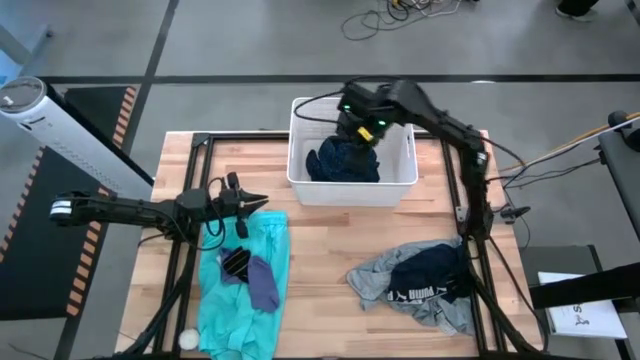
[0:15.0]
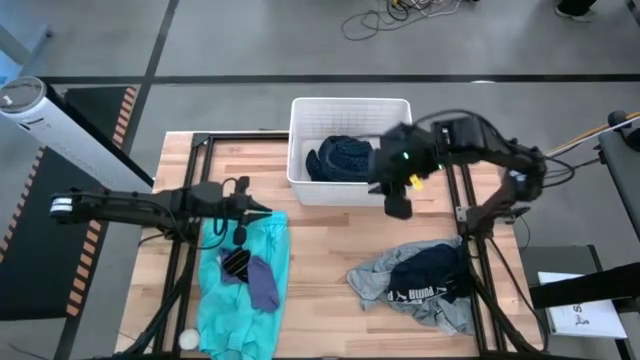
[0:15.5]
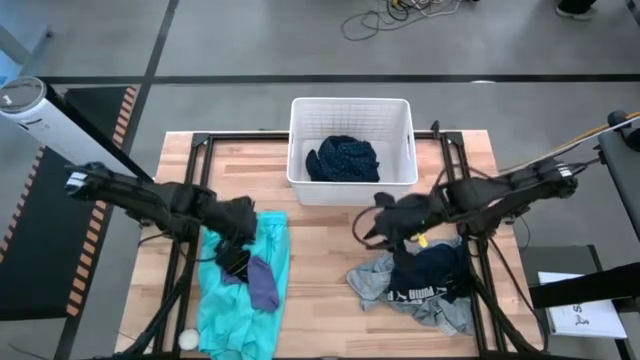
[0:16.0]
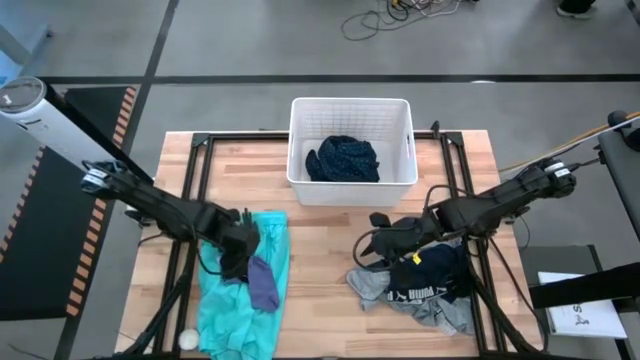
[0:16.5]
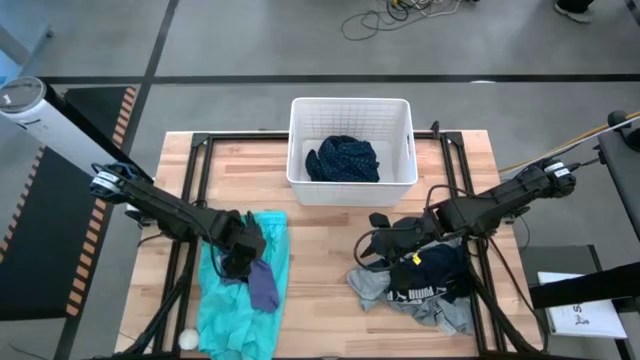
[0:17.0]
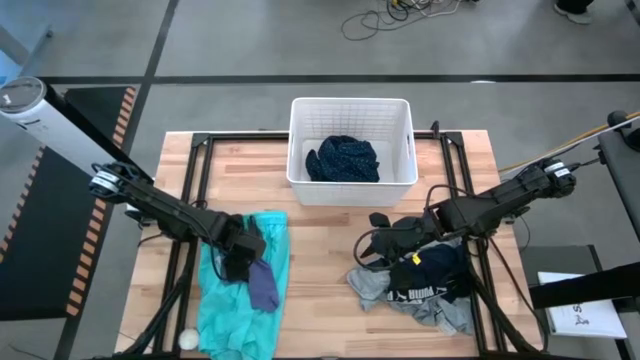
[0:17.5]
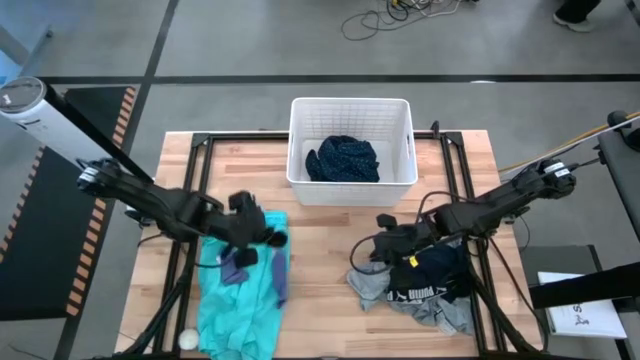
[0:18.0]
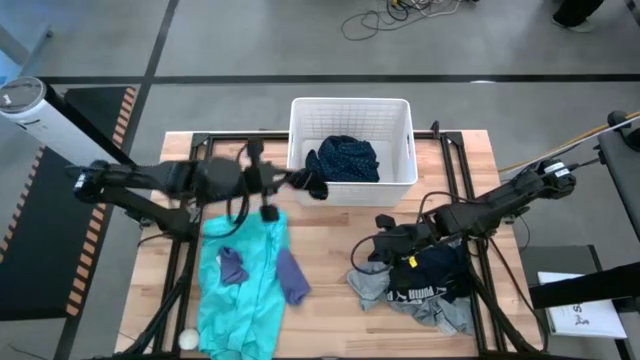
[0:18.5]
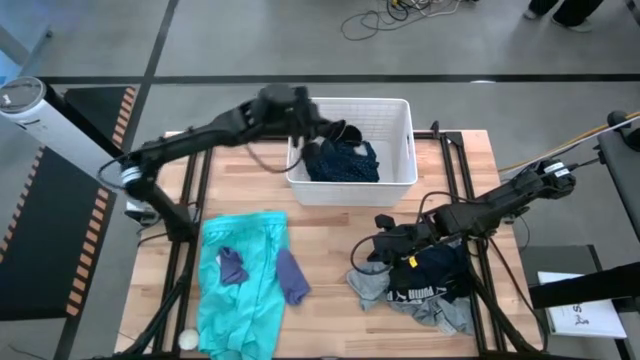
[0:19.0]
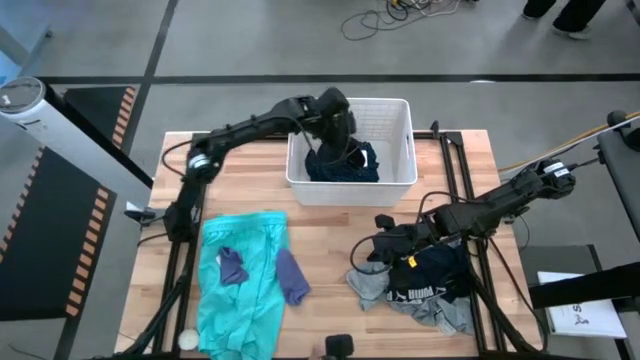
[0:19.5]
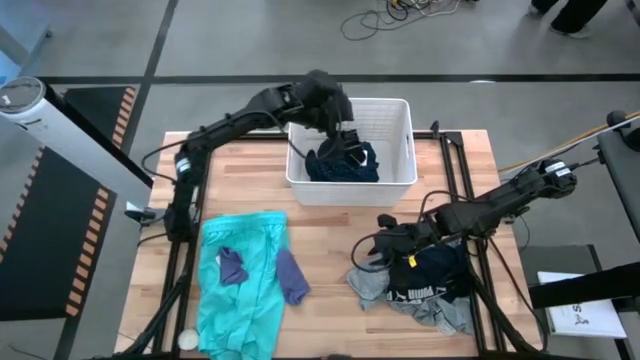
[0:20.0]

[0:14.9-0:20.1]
Task: Sort clothes
Put the black sock into the laundry bin

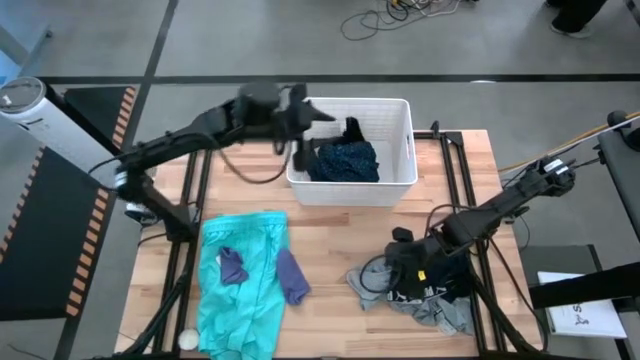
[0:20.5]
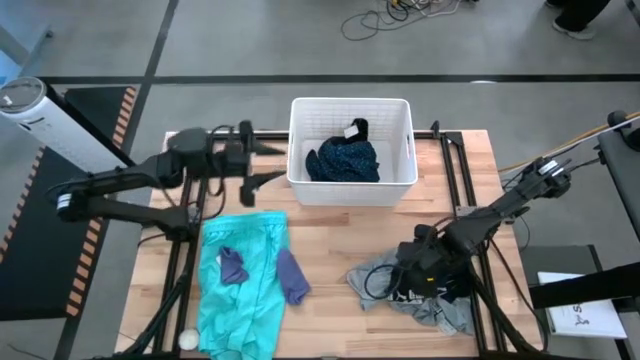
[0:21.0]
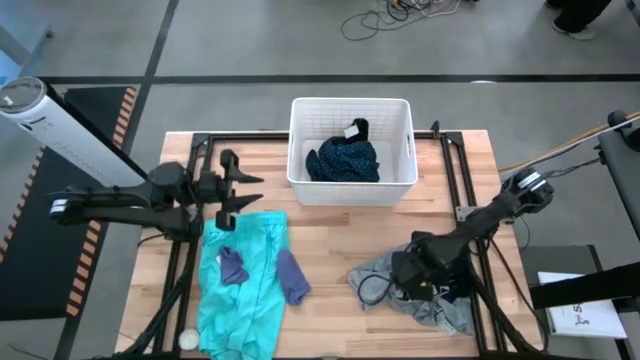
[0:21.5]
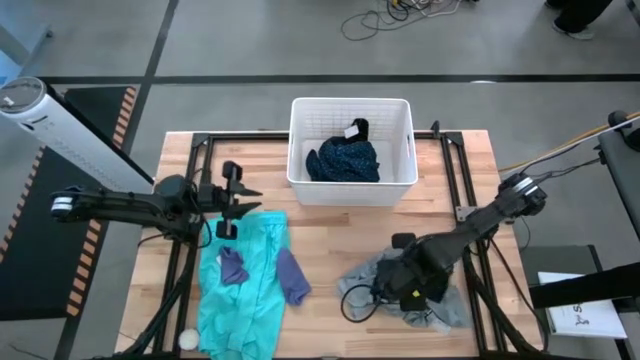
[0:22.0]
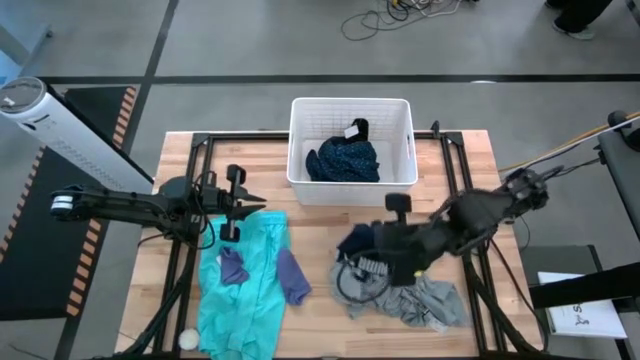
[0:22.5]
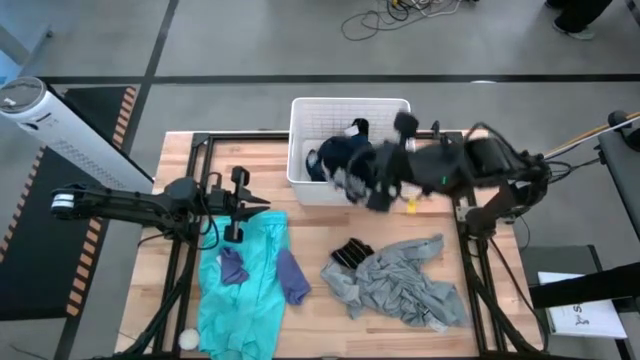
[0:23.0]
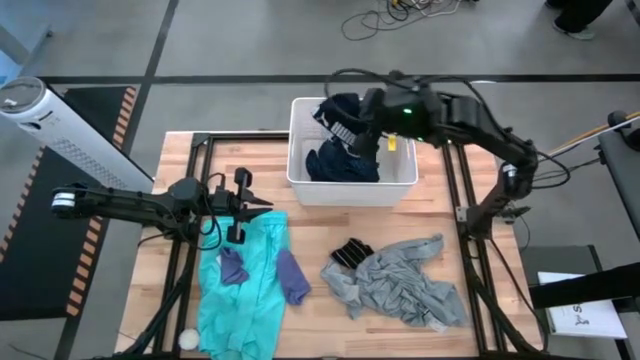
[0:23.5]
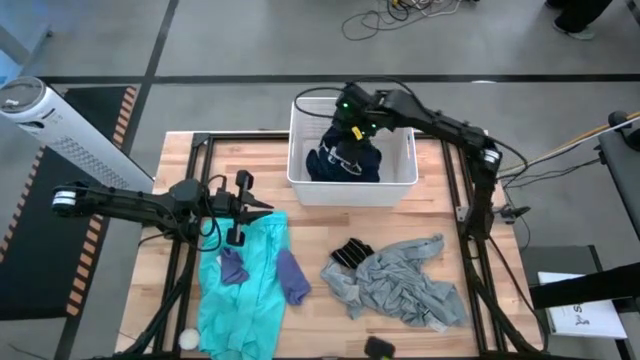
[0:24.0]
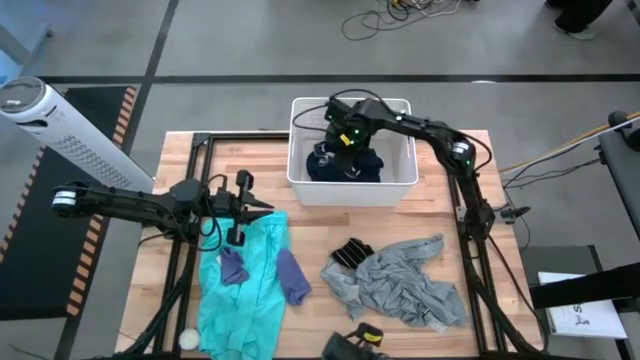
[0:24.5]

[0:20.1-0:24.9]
Put the blue boxers into the laundry bin

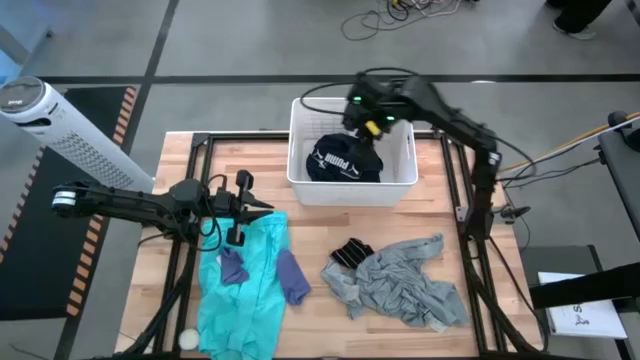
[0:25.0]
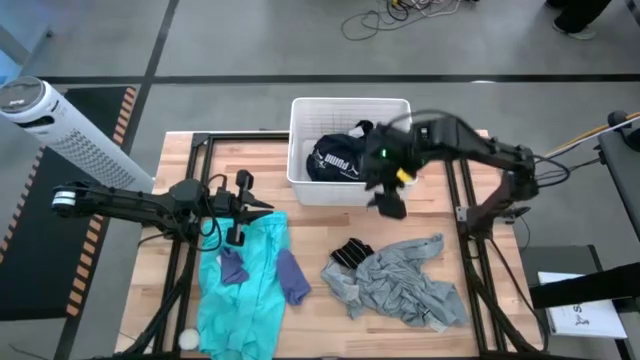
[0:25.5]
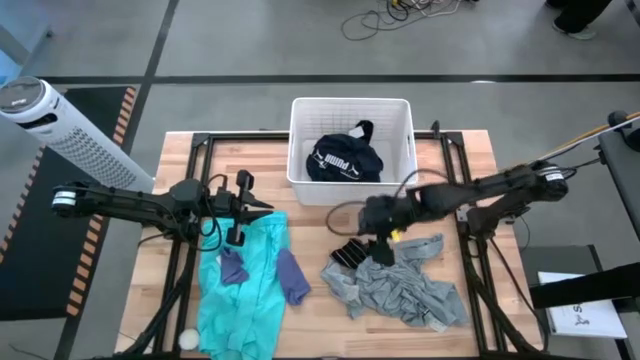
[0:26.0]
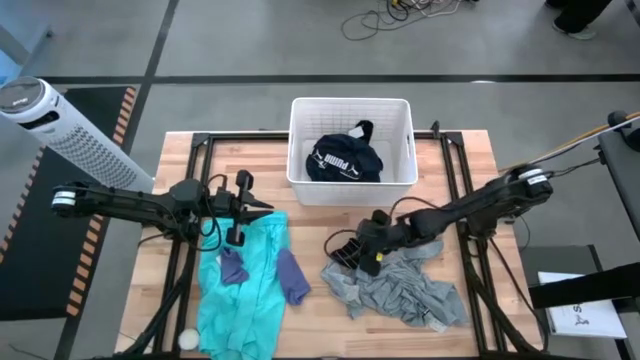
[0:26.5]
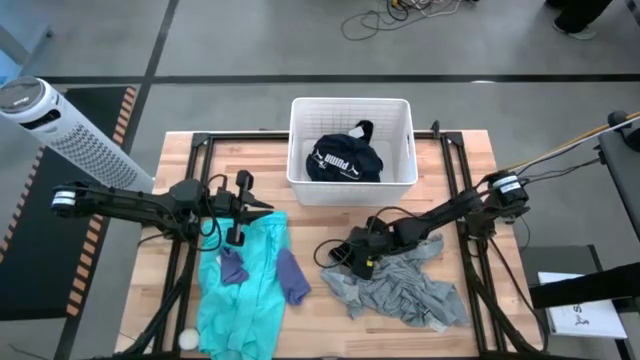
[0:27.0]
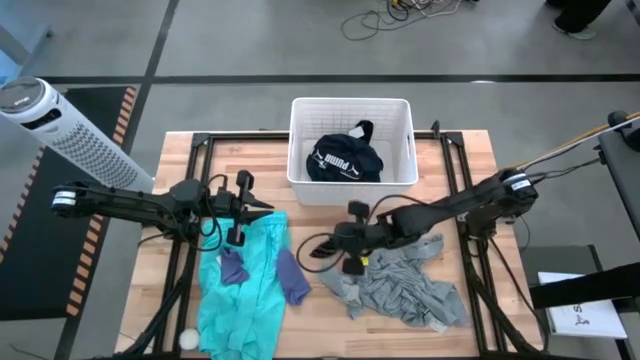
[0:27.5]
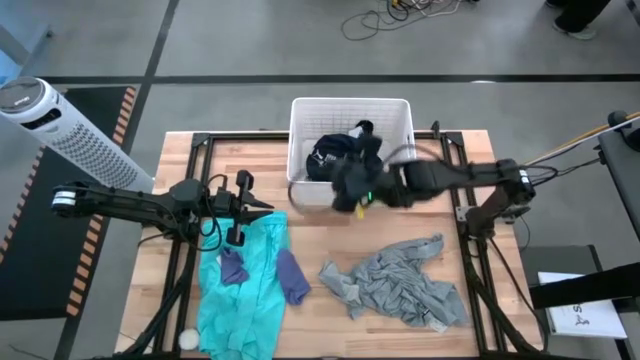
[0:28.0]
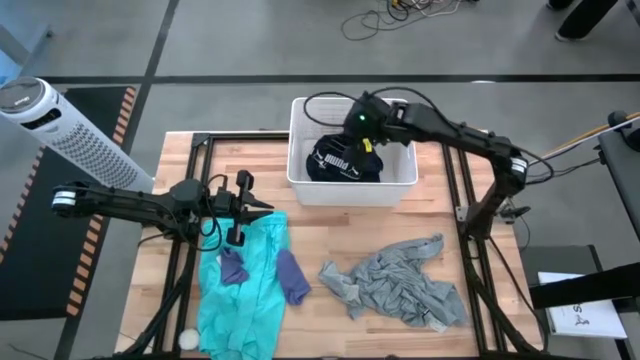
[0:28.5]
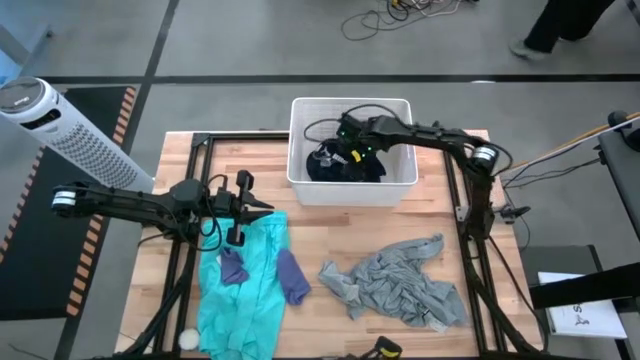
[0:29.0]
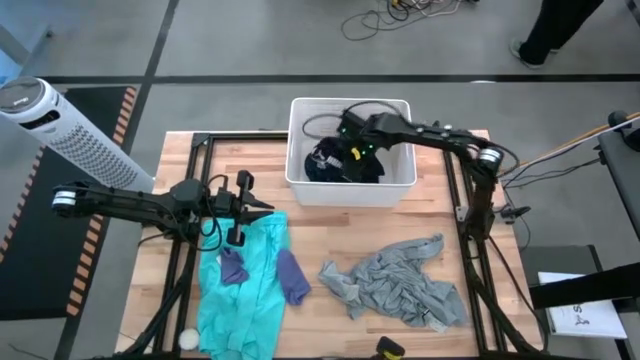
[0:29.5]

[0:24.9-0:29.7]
Put the black sock into the laundry bin

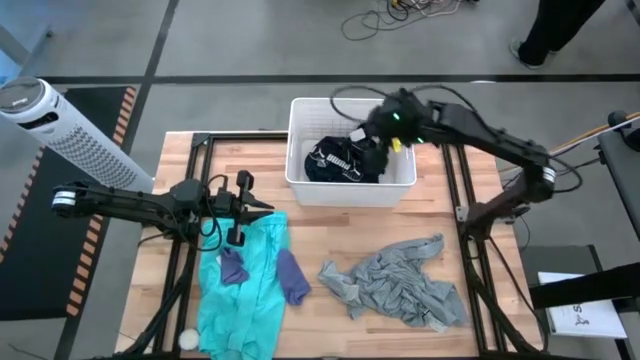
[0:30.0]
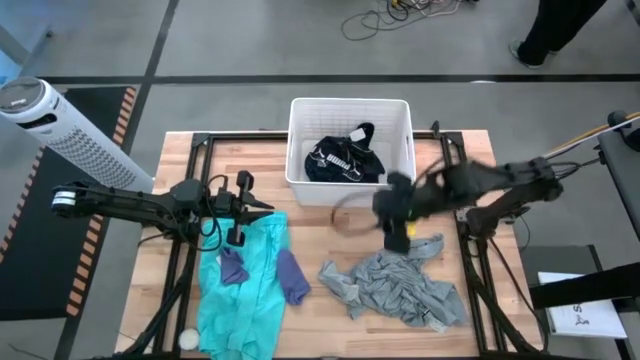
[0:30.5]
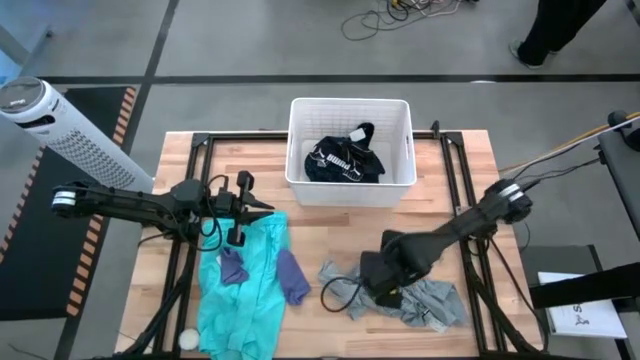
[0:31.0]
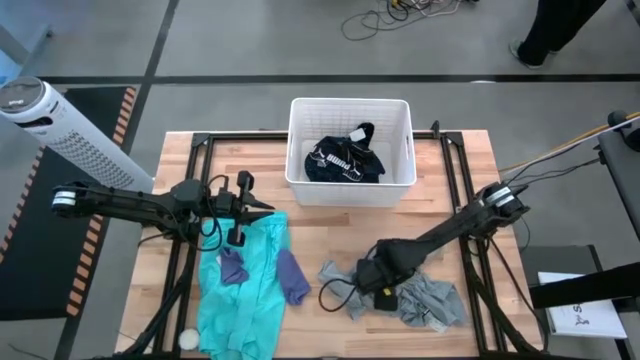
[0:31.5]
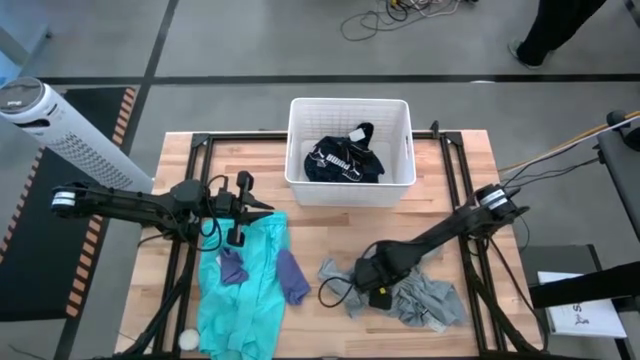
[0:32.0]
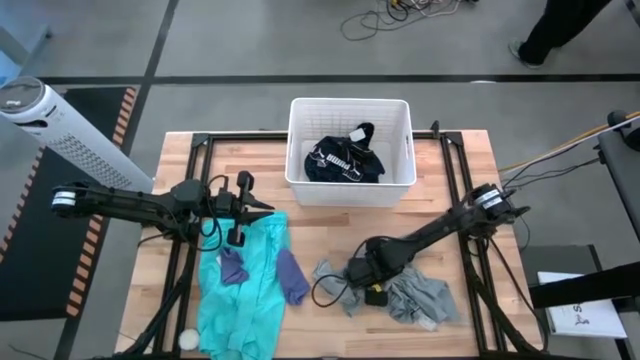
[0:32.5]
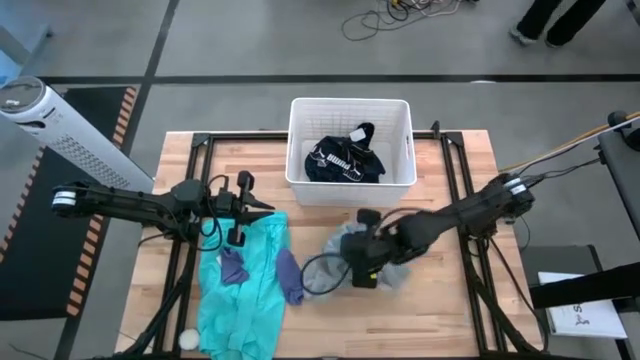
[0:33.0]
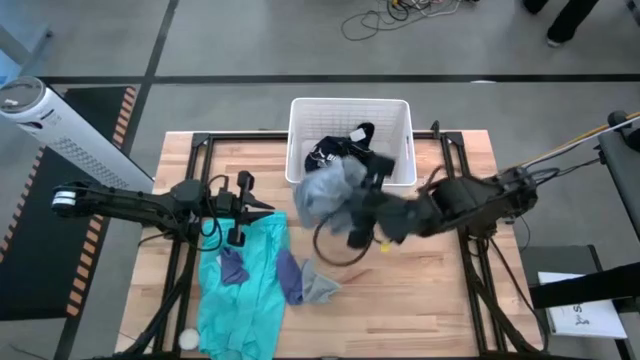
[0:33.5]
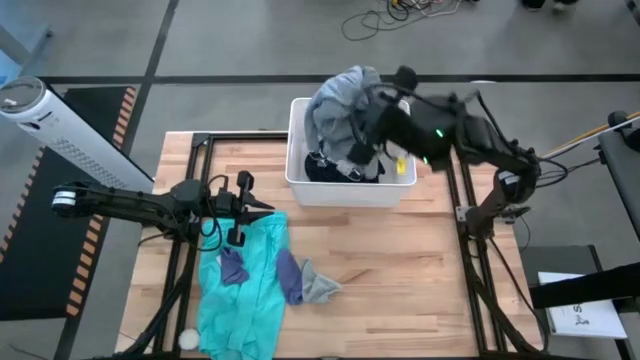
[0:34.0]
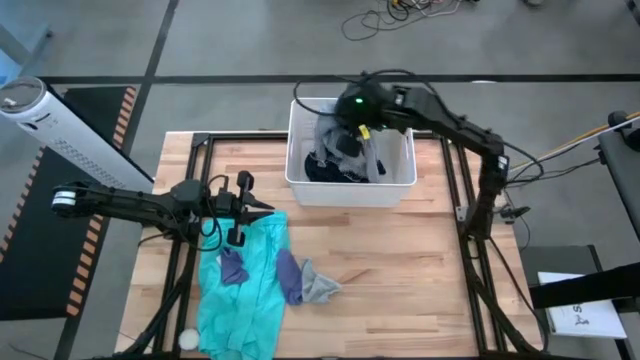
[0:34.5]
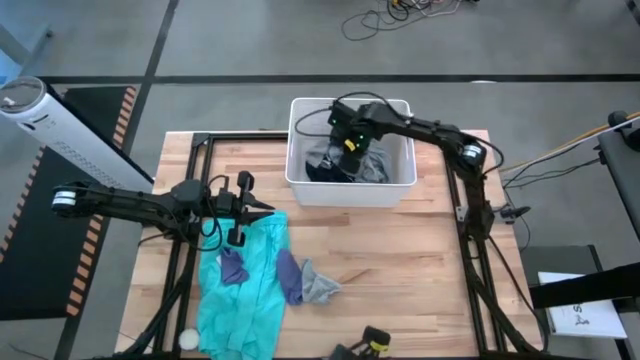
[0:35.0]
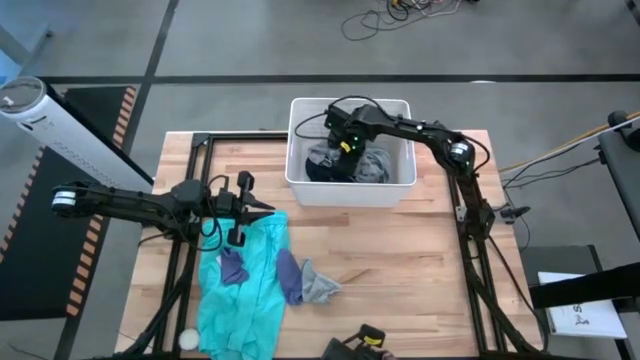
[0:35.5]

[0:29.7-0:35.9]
Put the grey shirt into the laundry bin

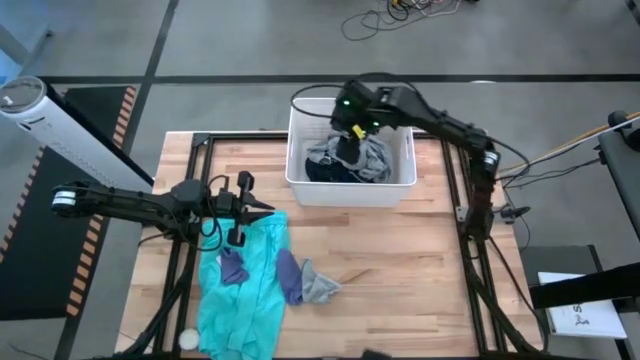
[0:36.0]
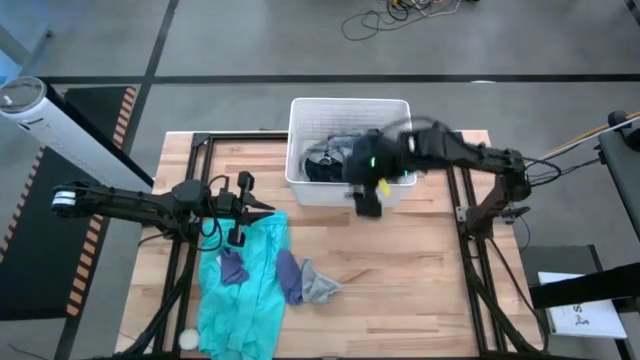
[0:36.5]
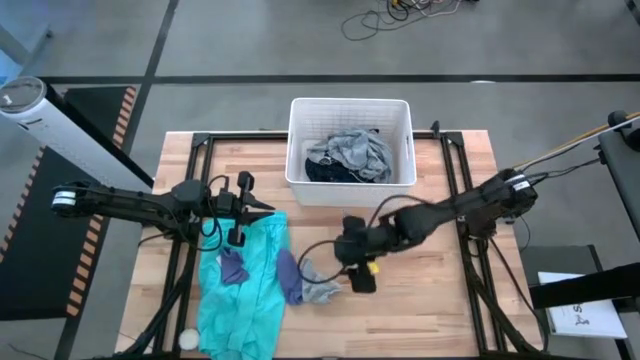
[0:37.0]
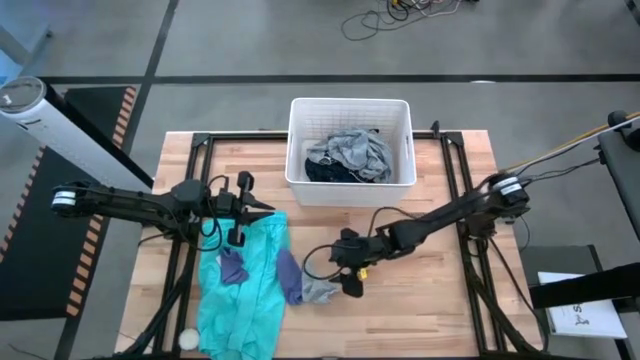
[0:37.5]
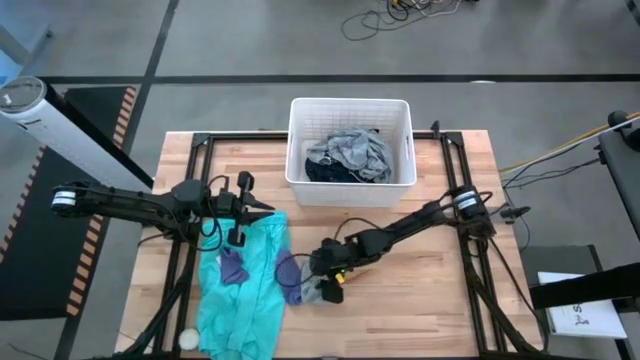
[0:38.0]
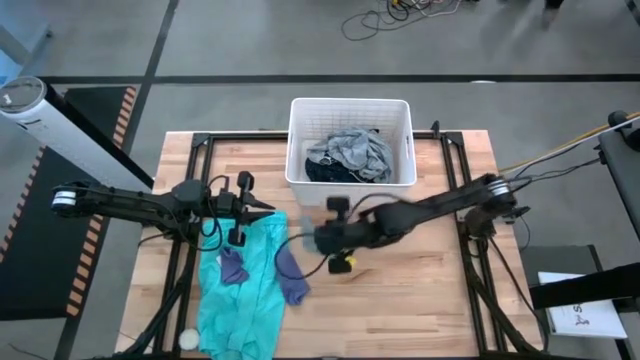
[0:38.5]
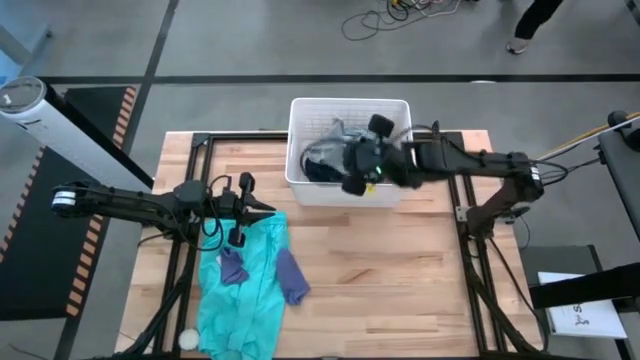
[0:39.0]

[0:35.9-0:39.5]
Put the gray socks into the laundry bin
